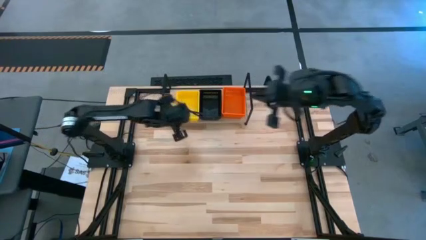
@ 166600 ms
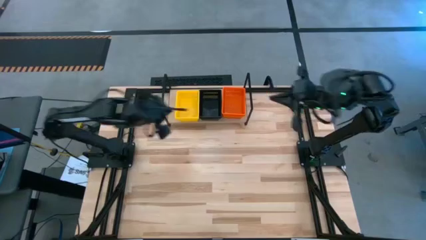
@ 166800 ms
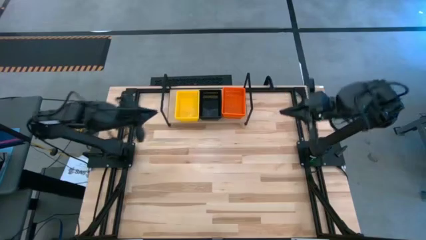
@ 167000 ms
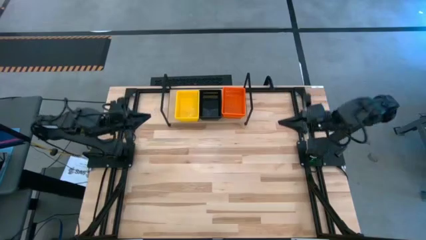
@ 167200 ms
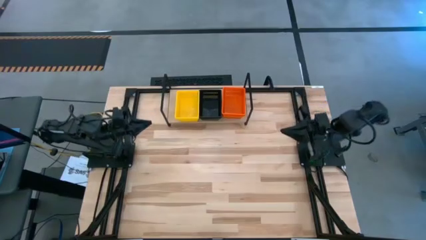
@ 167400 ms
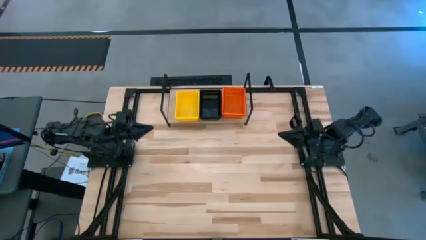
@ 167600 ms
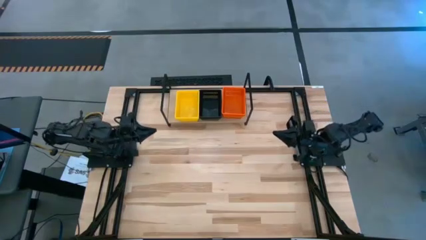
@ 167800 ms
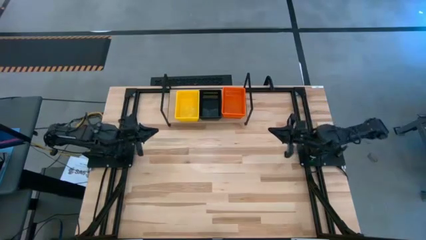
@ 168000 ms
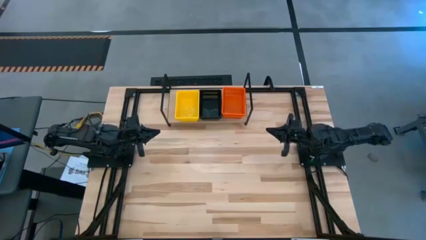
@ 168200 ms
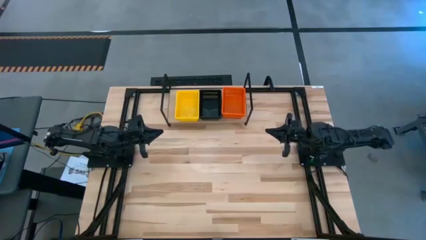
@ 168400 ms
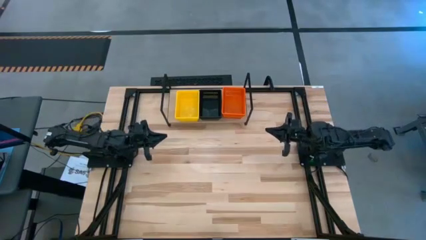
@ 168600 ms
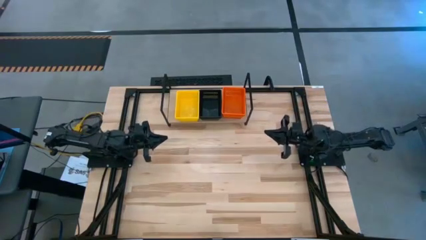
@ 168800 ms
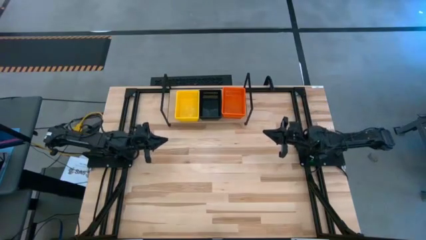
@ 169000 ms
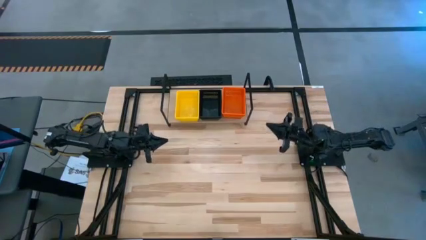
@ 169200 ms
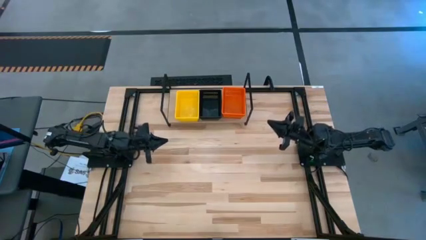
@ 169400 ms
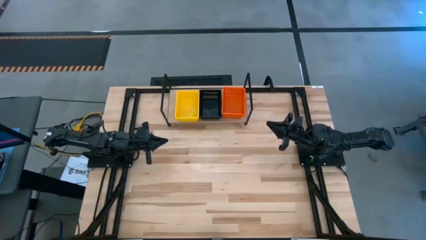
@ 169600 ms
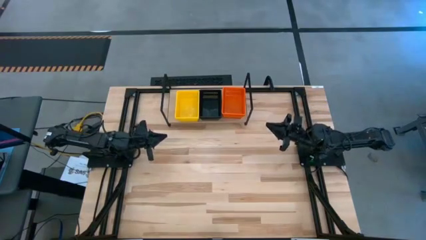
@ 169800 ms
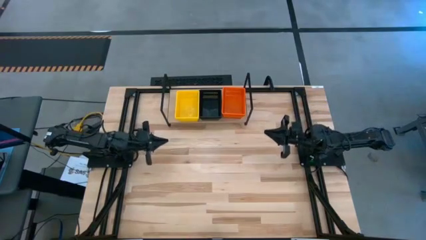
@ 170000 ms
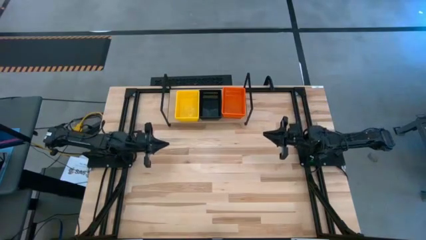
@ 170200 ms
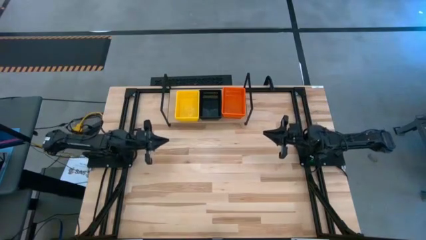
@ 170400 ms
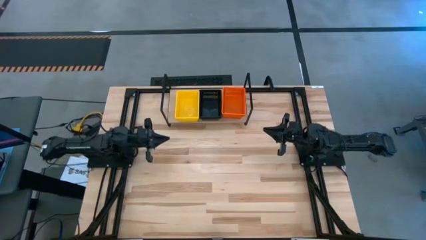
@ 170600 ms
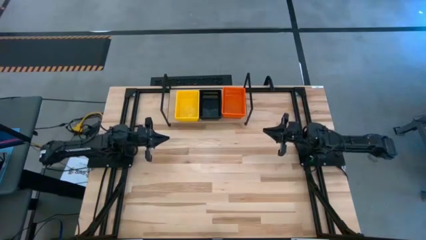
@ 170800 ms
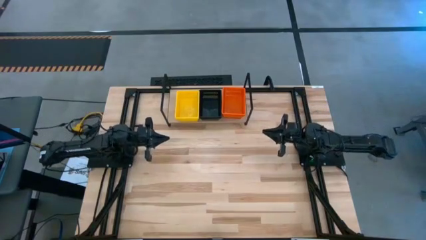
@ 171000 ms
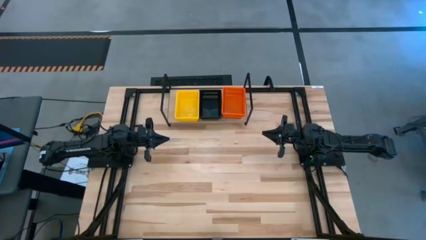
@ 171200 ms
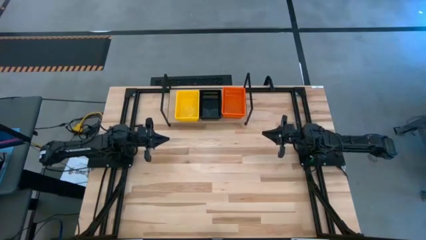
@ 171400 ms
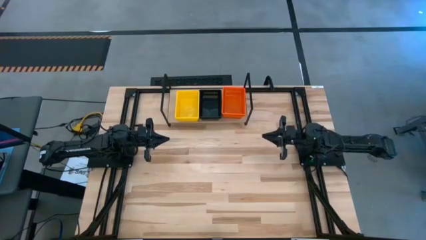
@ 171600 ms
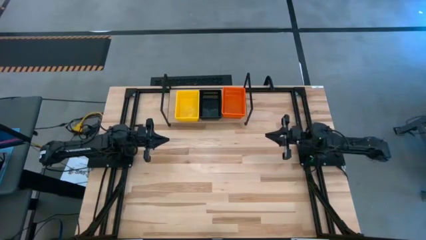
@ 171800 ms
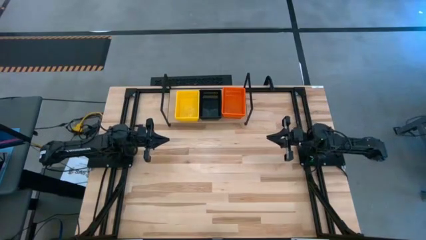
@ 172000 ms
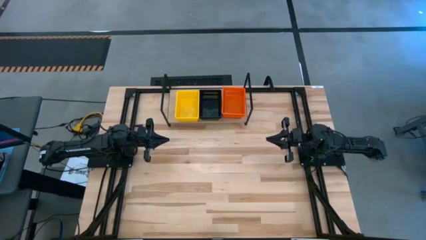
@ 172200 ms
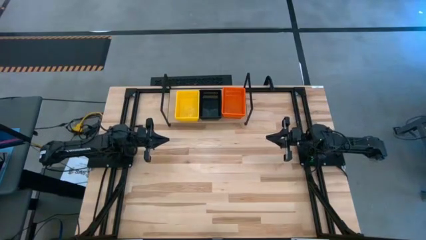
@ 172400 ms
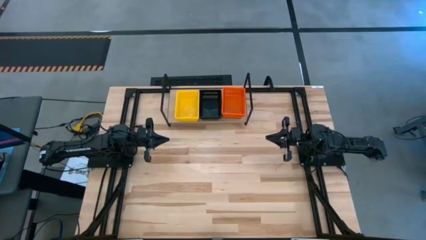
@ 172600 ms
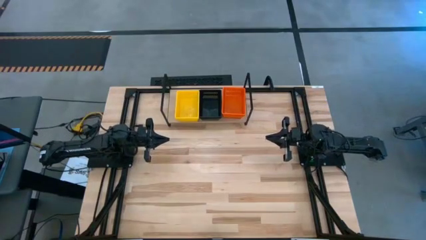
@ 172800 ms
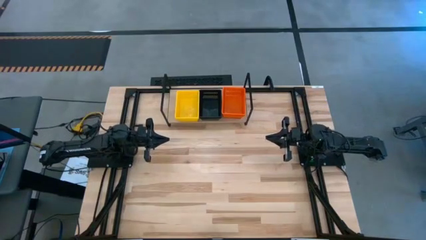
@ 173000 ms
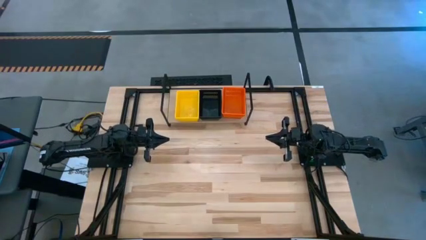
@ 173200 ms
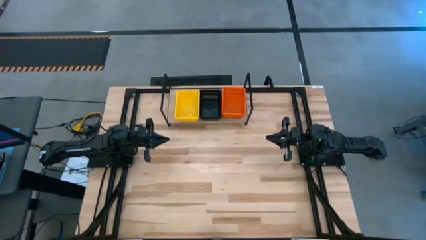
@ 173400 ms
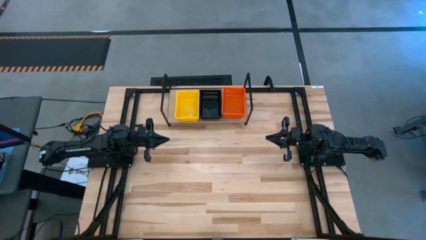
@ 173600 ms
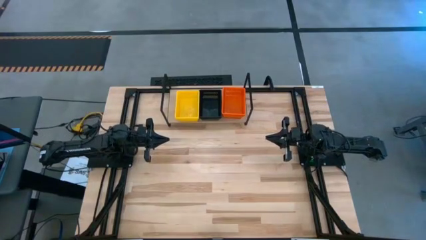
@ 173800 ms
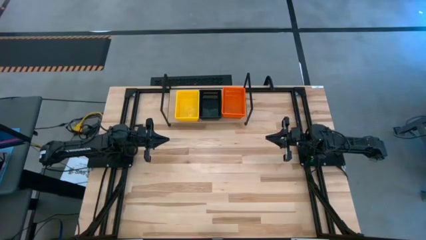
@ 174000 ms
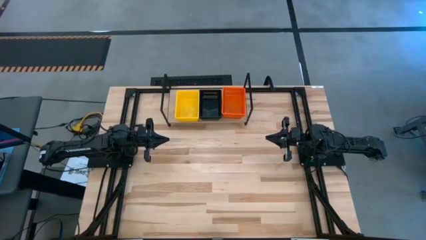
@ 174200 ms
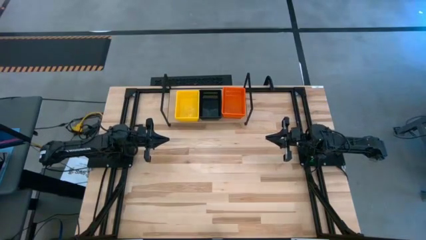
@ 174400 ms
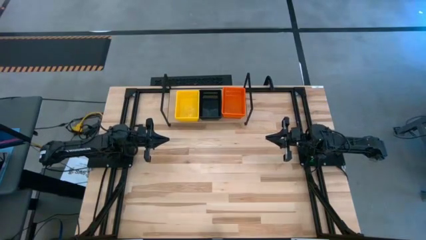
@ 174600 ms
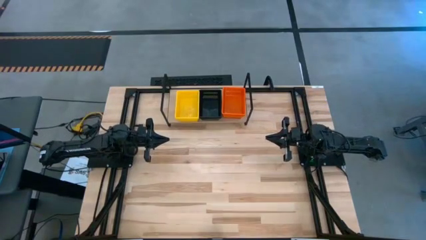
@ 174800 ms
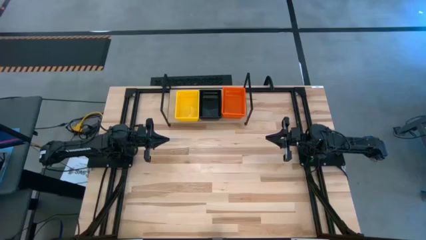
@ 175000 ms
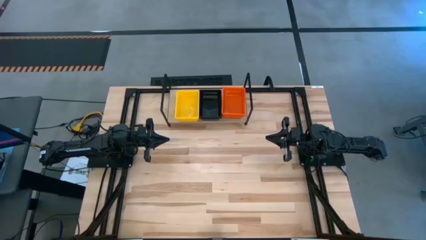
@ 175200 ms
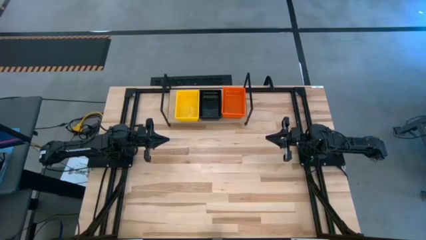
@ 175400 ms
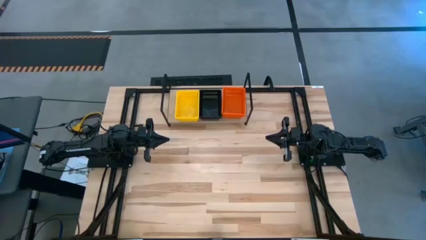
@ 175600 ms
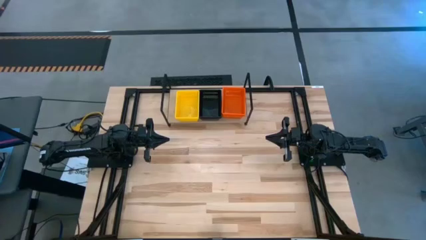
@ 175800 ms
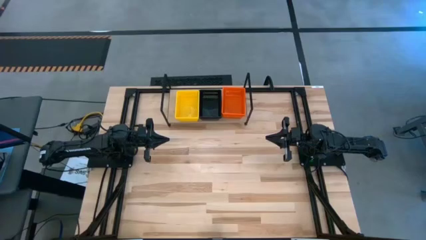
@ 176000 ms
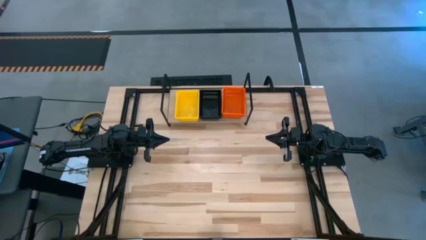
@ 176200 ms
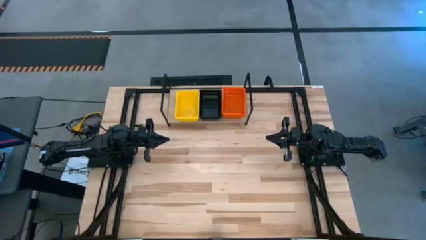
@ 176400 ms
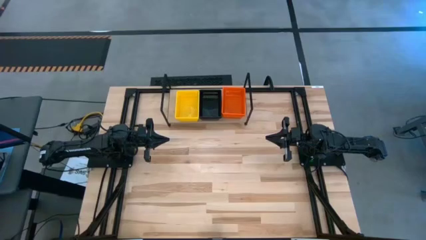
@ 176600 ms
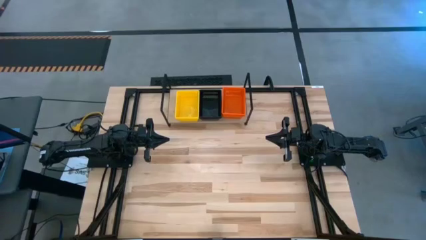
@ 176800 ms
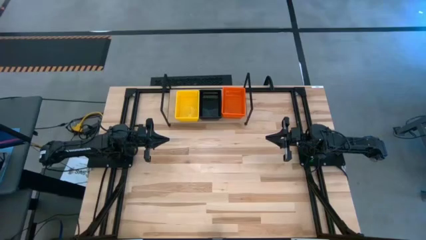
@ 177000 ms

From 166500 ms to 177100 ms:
Task: Stack baskets on shelf by color
Return to Home Position
